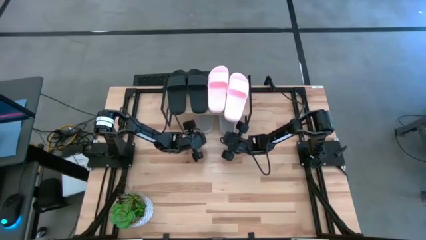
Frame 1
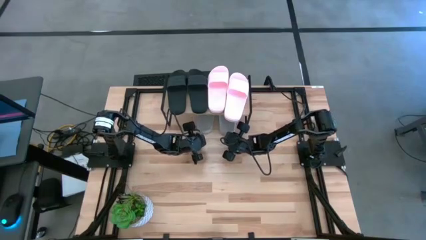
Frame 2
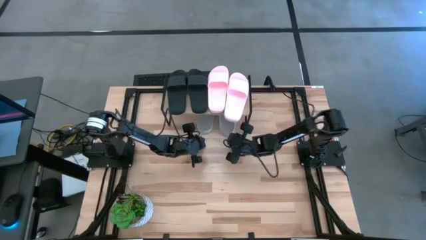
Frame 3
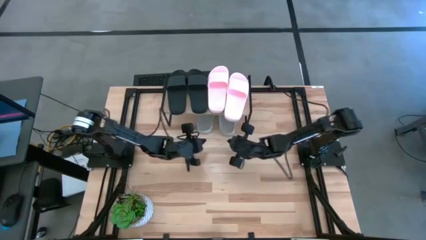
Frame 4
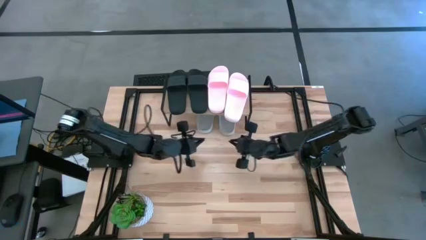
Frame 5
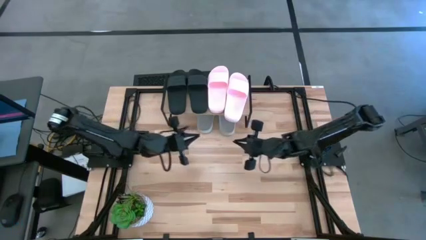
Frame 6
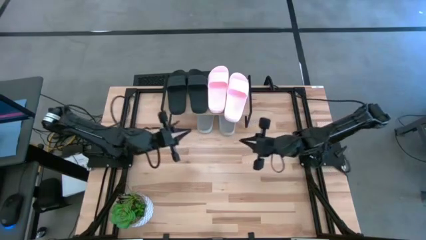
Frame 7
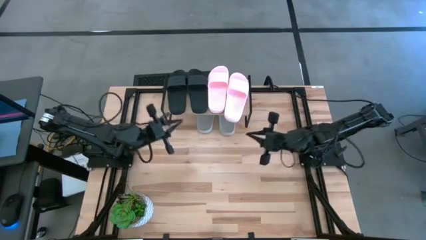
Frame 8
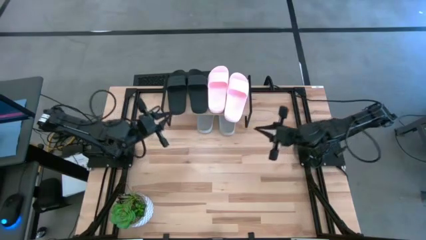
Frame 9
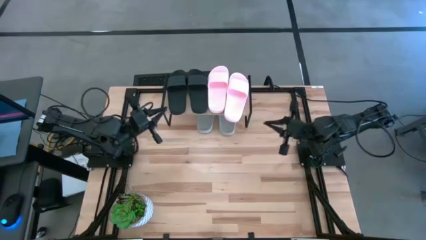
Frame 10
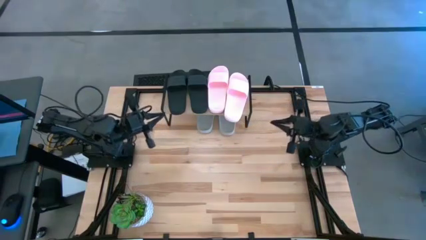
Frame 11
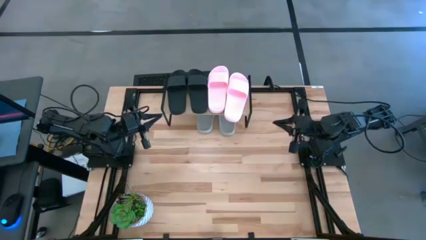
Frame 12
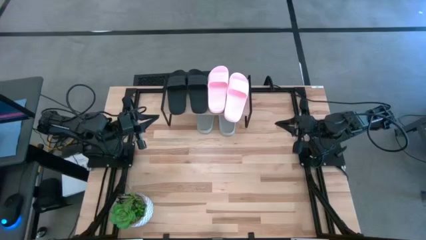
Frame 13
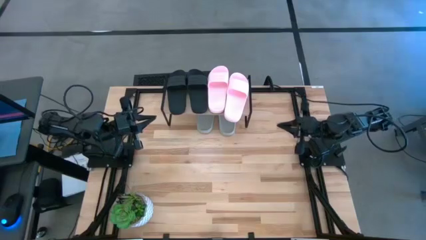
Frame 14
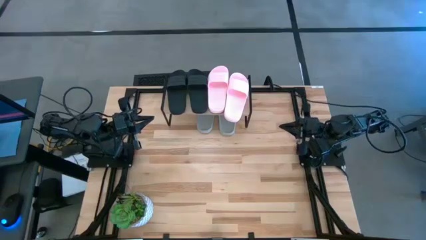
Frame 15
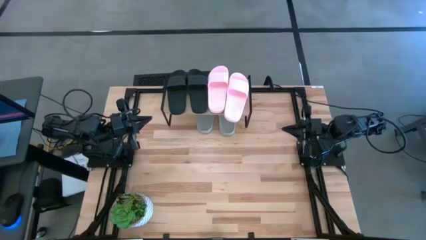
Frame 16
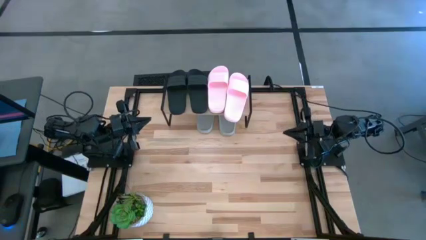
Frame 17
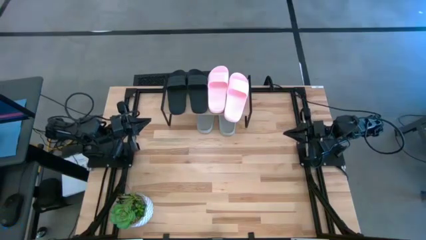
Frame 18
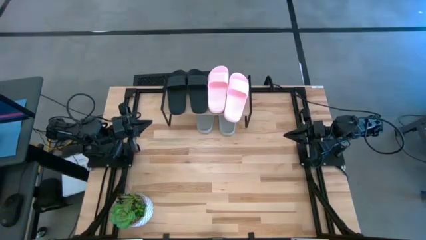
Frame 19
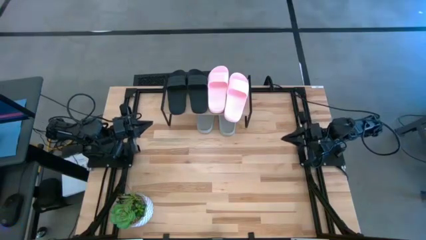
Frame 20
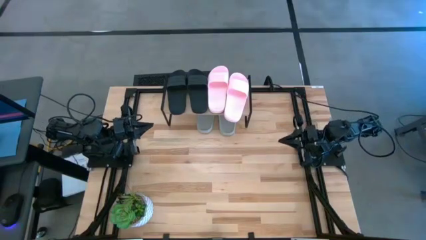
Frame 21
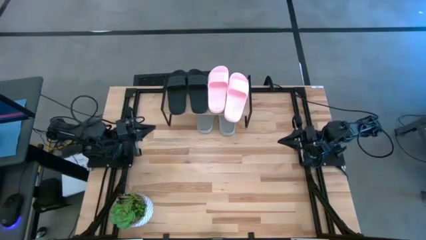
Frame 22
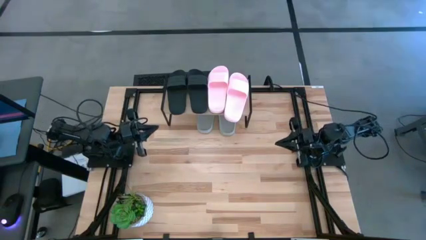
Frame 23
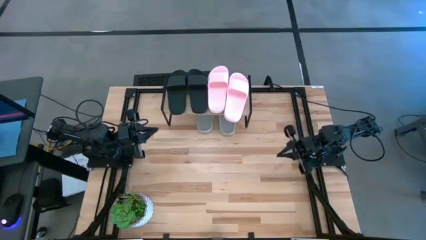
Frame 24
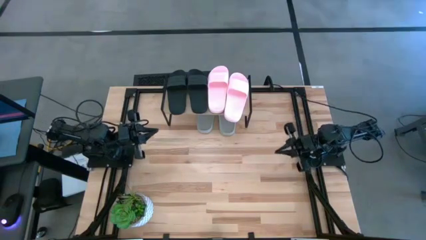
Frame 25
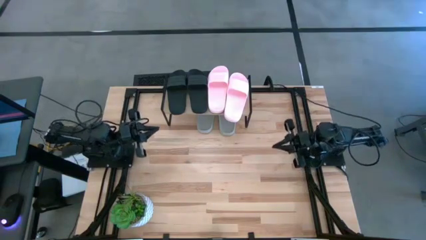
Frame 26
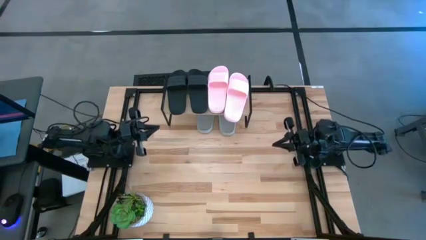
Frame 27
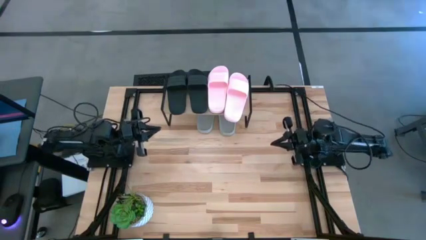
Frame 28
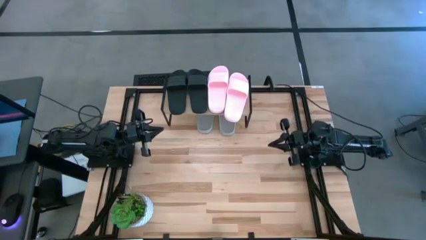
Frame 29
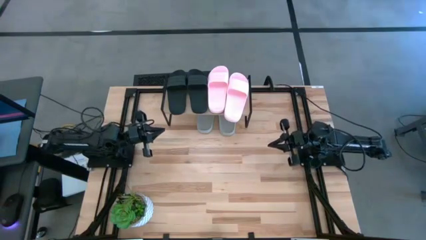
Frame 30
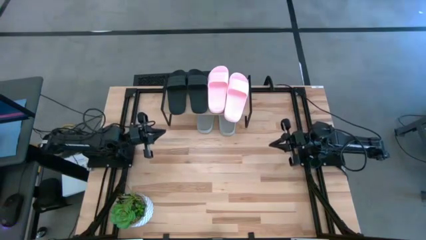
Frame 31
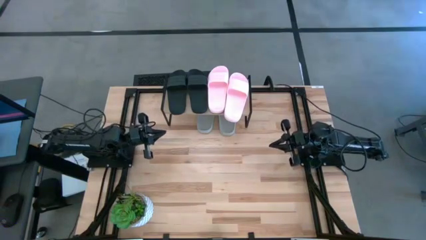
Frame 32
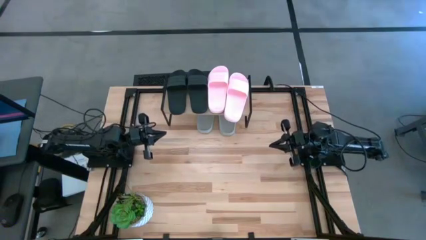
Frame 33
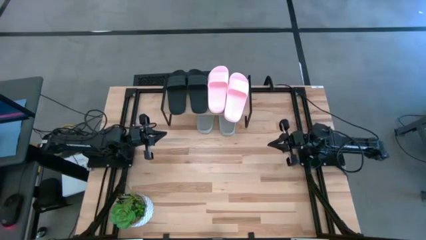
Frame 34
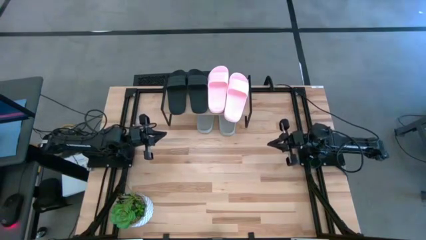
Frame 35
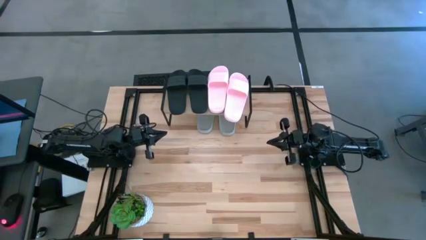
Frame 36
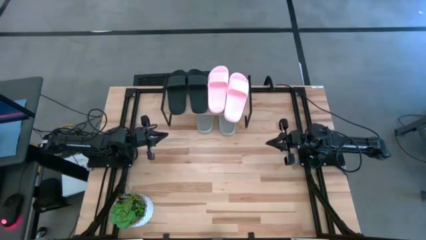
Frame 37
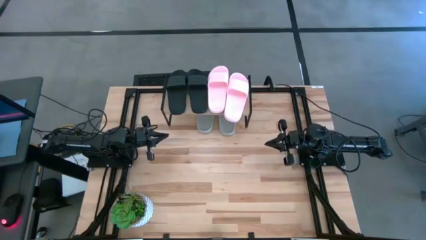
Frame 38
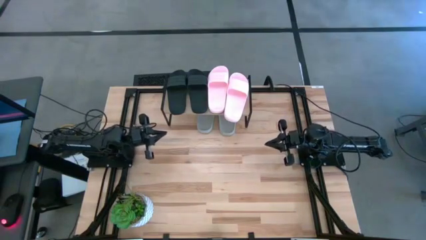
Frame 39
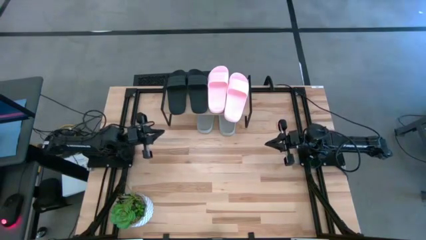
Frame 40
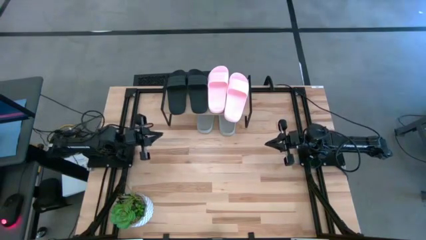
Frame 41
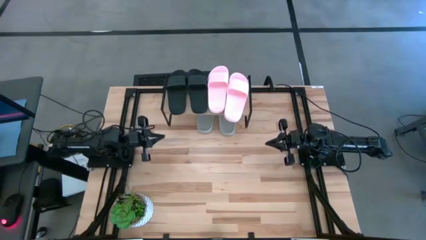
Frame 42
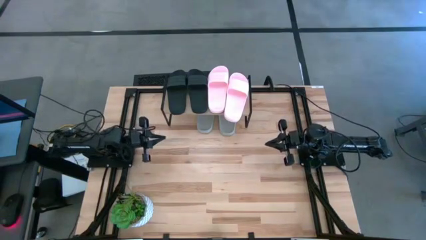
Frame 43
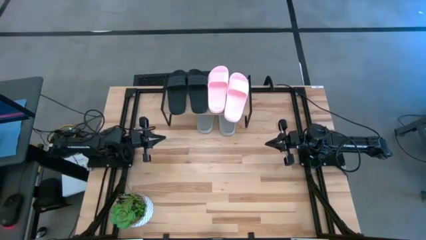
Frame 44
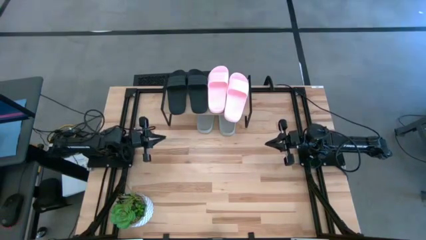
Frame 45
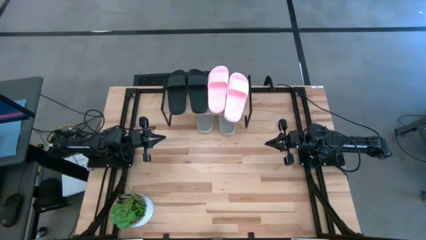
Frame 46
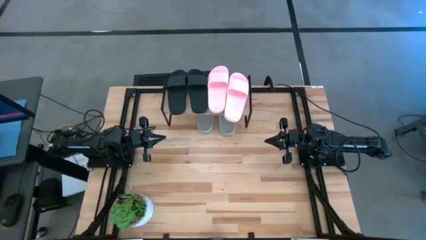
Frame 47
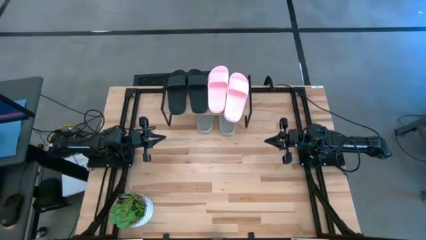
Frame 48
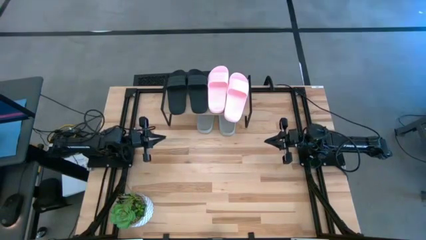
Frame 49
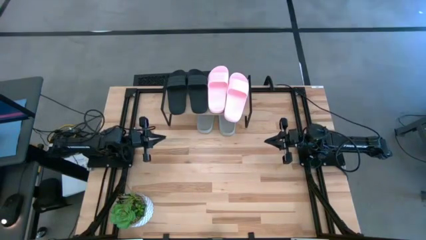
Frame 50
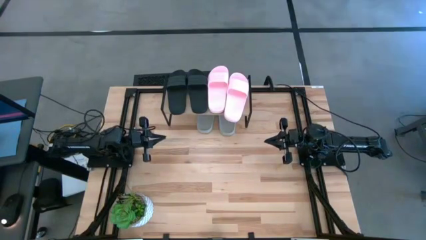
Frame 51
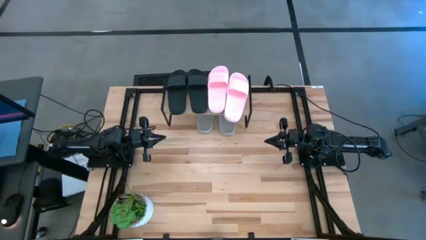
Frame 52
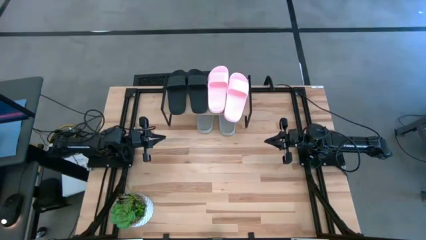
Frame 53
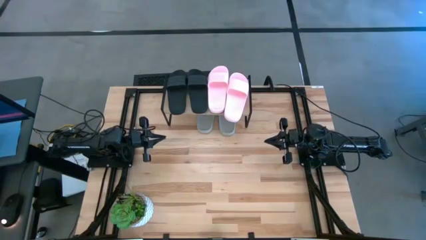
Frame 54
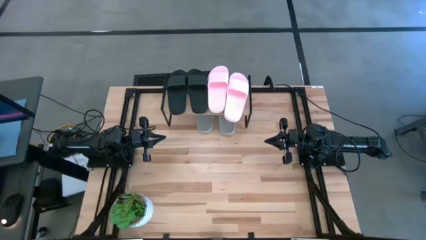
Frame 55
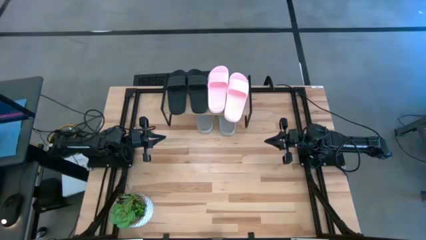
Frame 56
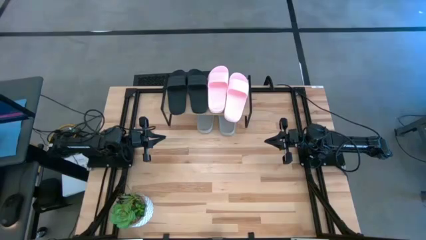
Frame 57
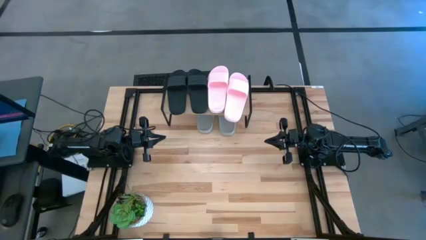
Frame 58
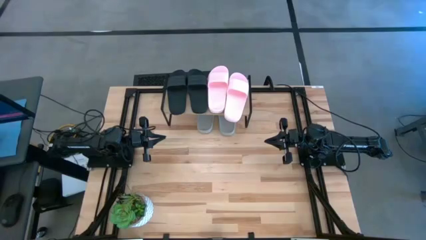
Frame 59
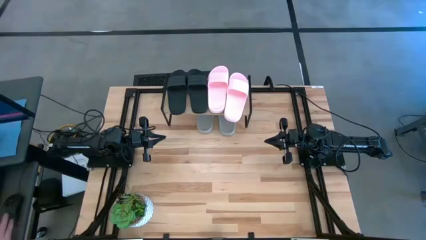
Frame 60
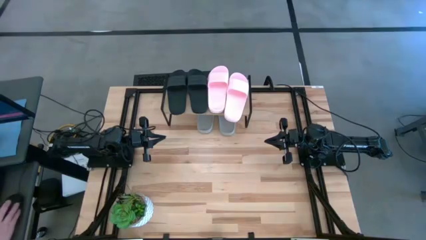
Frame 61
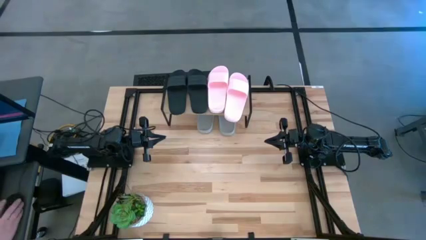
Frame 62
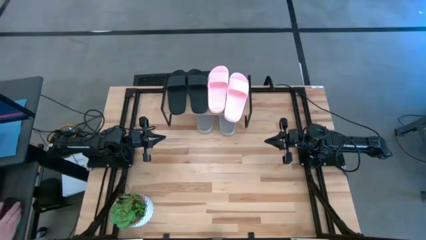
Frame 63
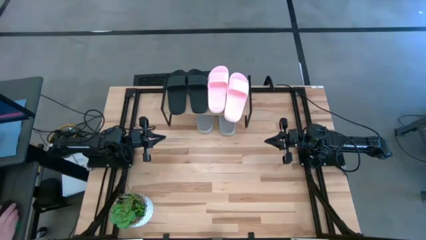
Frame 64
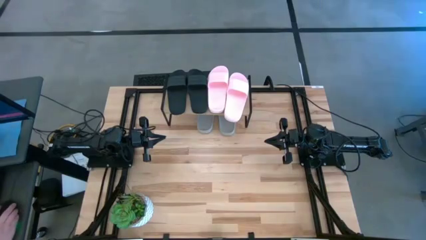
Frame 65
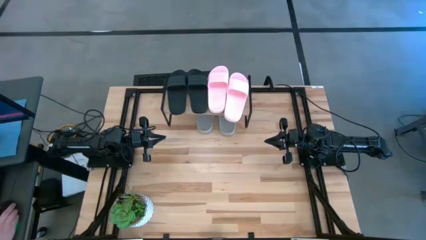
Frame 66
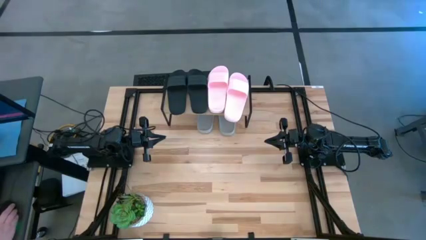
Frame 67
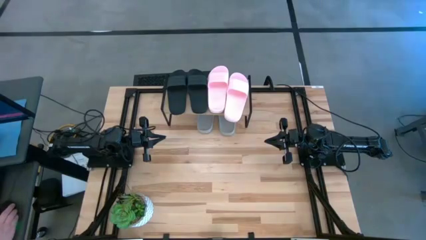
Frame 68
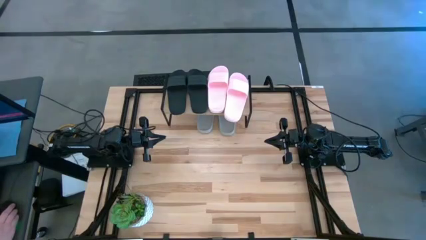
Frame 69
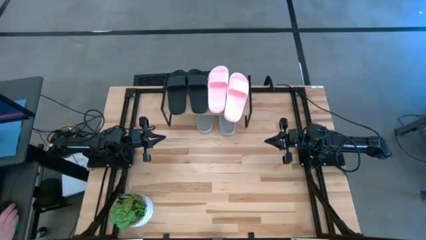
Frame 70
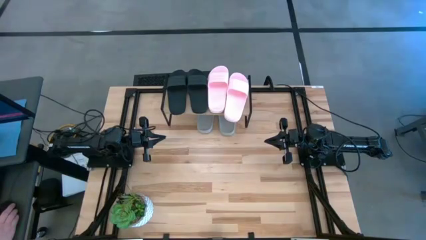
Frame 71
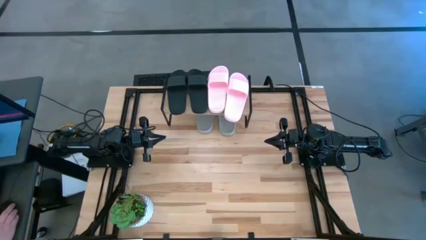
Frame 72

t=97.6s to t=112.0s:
Task: Pick and place slides into the shelf
Return to Home Position

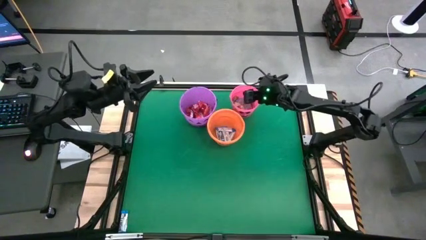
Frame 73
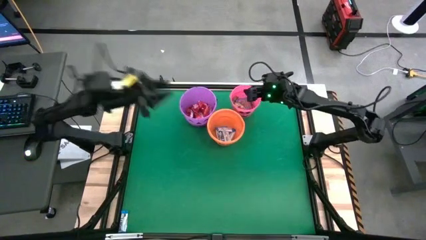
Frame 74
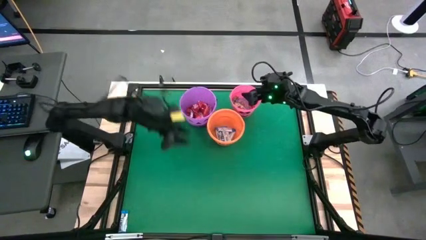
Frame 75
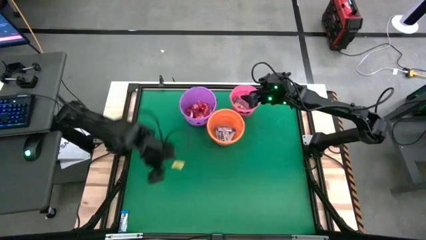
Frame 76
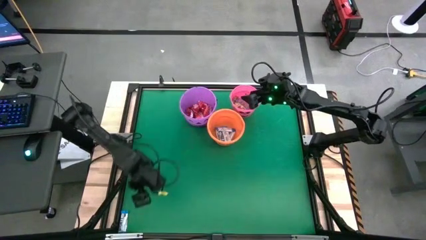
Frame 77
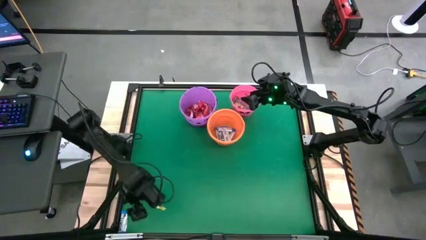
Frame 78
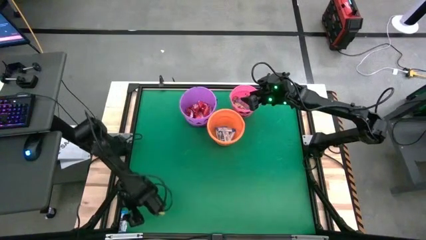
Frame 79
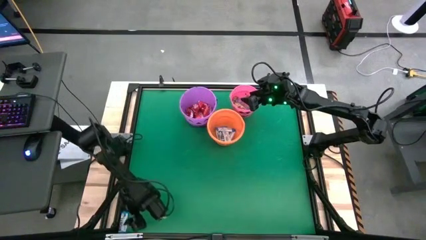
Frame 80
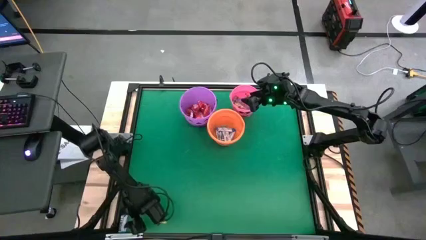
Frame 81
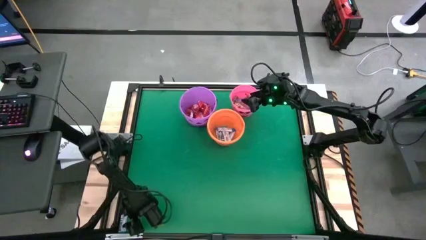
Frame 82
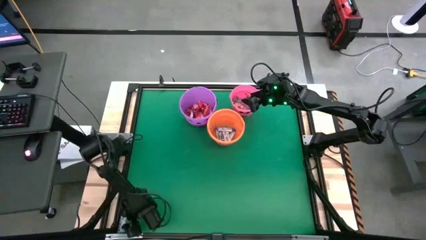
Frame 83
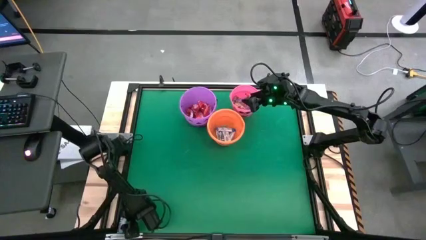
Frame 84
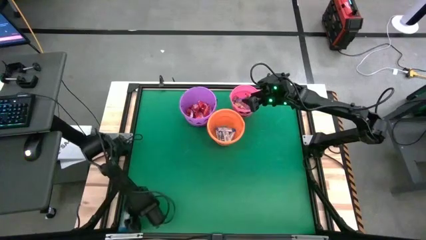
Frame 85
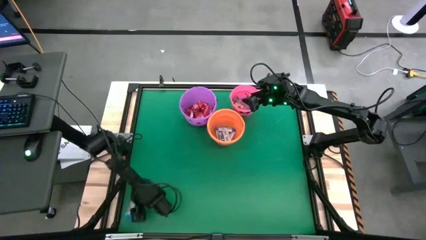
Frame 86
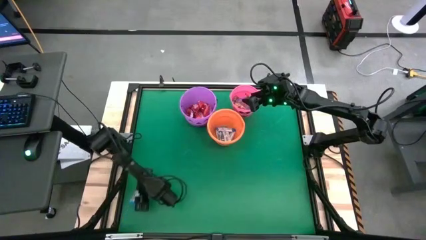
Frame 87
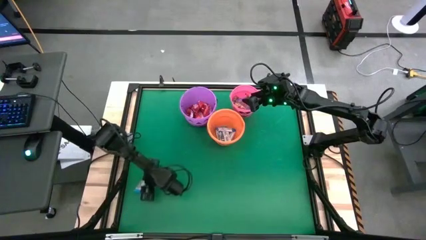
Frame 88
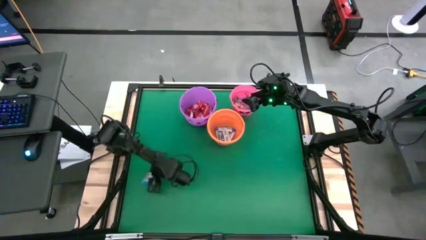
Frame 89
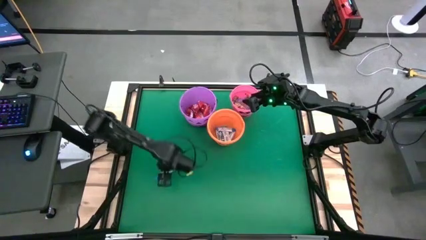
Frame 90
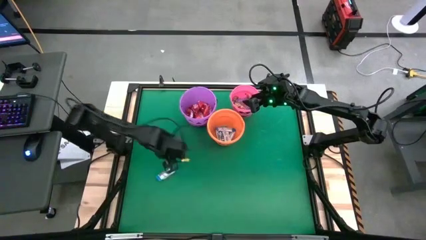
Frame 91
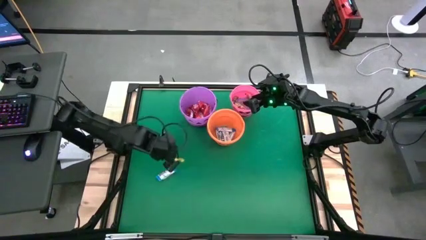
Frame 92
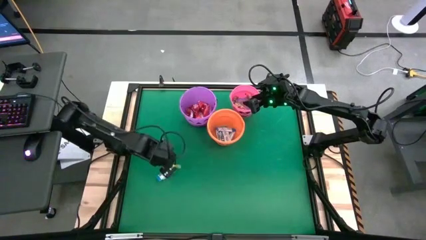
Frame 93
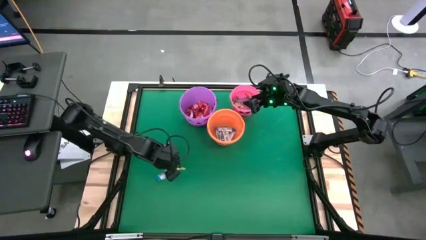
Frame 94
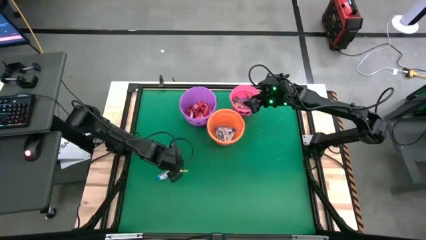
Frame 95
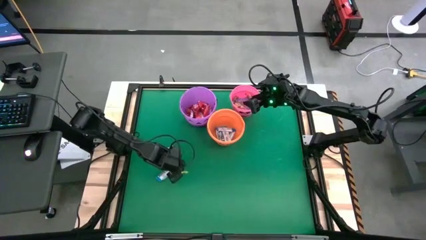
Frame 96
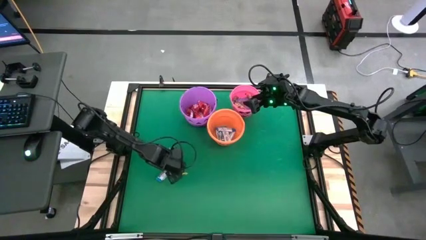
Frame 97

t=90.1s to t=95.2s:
Task: Sort candy by brand, put in halloween buckets
Put the white chocolate into the orange bucket
